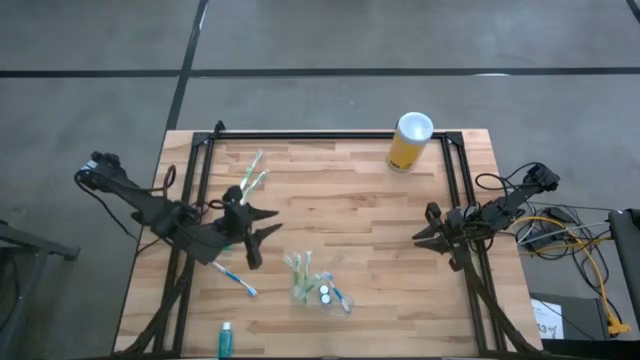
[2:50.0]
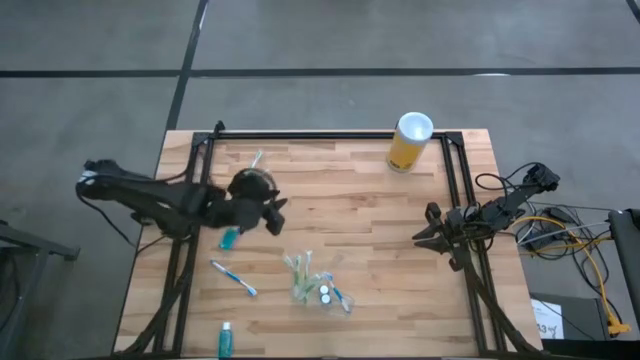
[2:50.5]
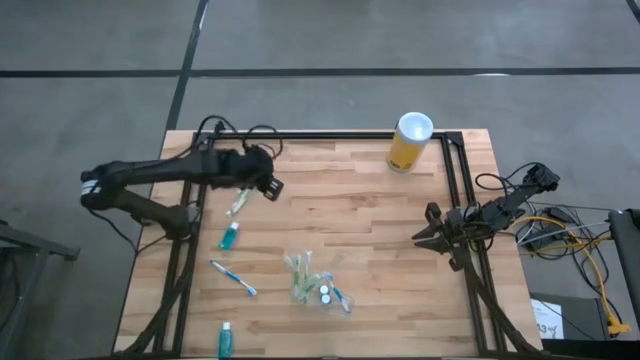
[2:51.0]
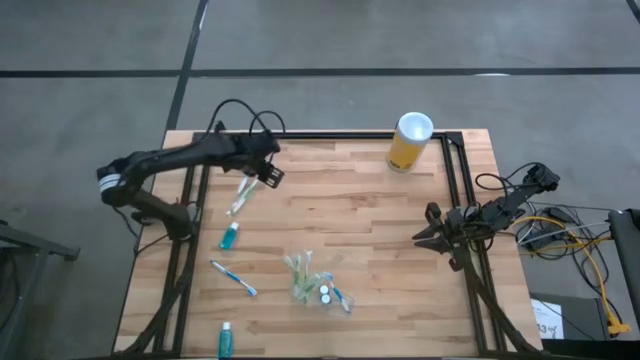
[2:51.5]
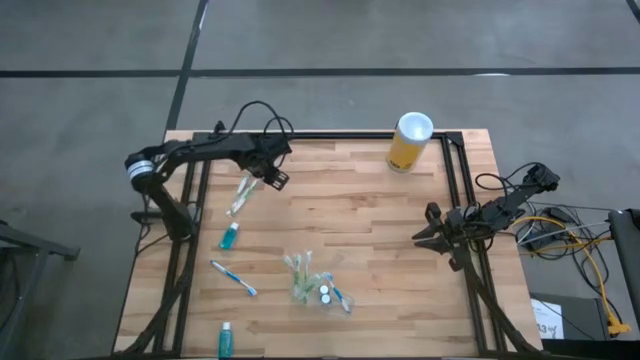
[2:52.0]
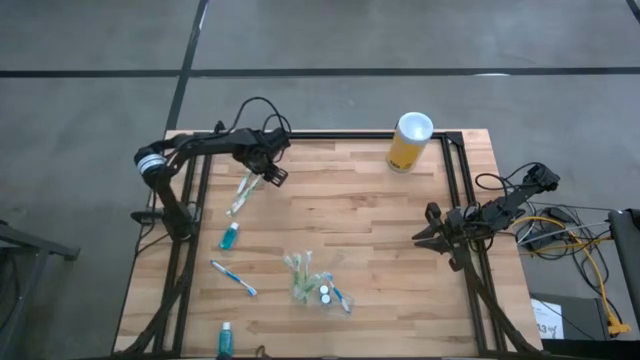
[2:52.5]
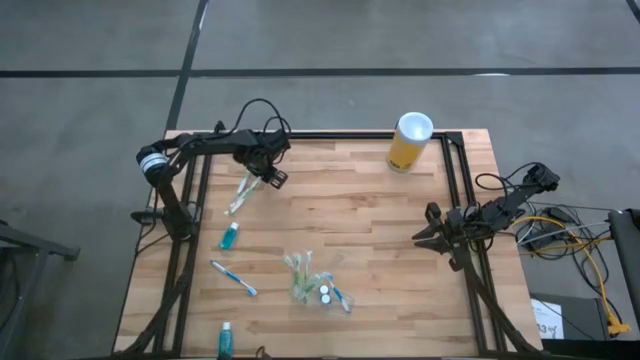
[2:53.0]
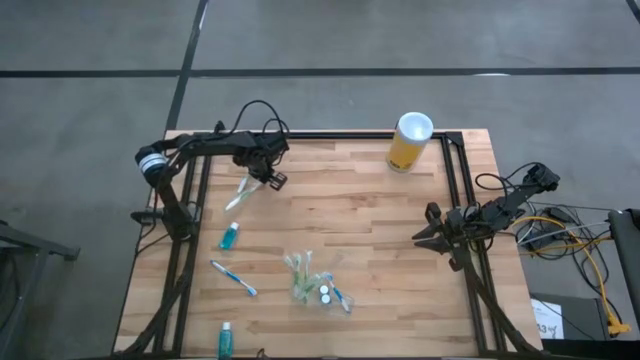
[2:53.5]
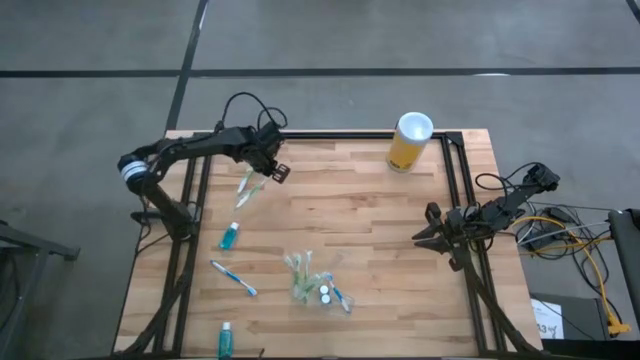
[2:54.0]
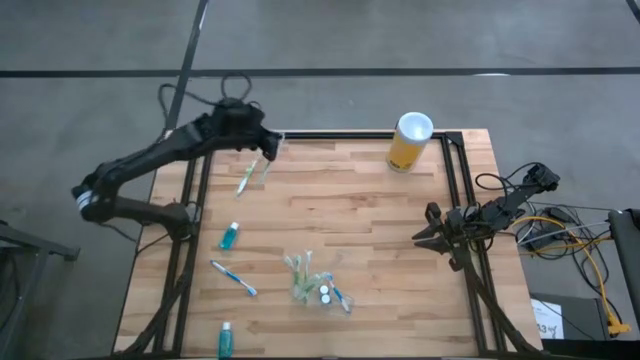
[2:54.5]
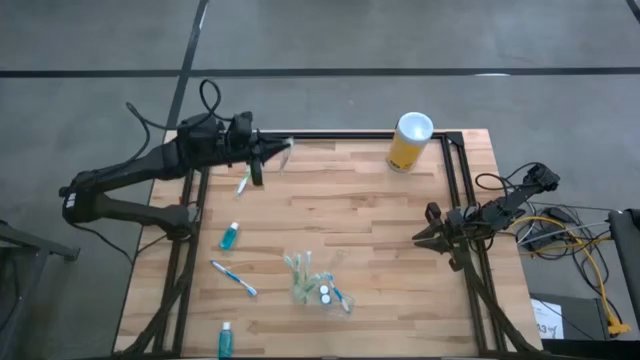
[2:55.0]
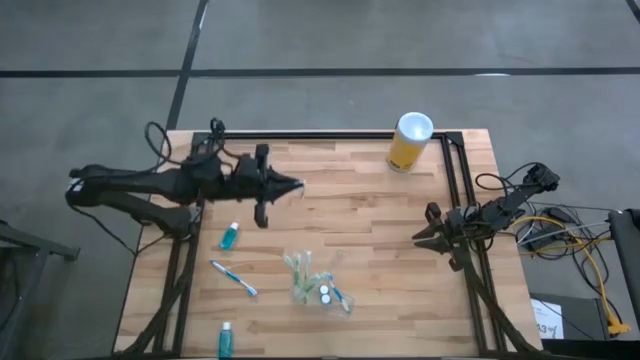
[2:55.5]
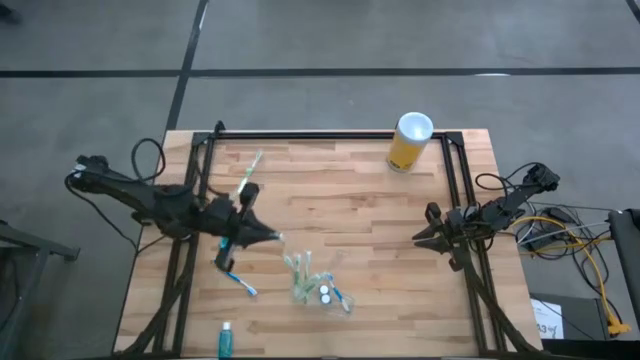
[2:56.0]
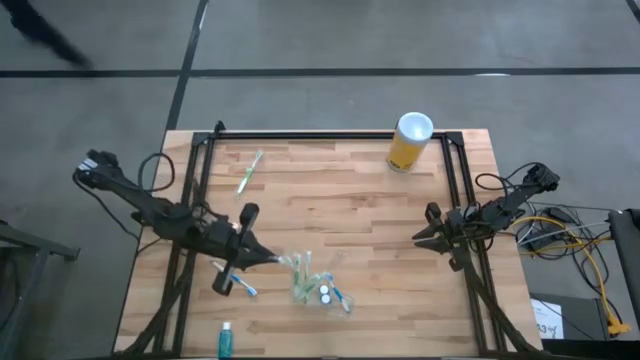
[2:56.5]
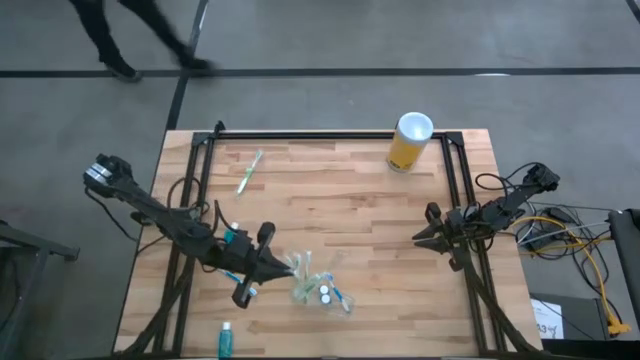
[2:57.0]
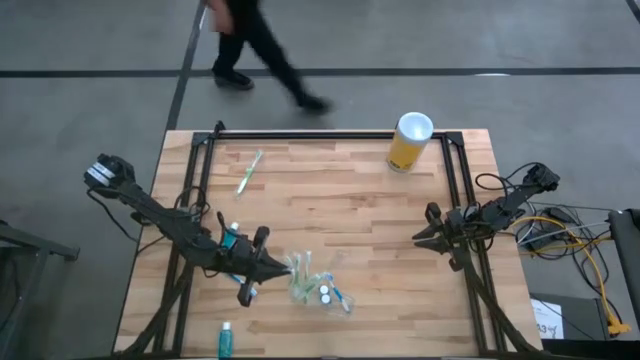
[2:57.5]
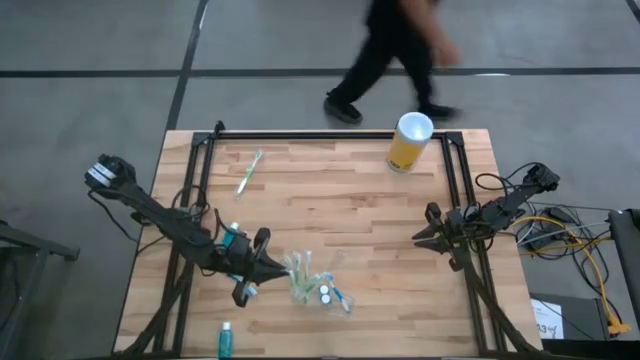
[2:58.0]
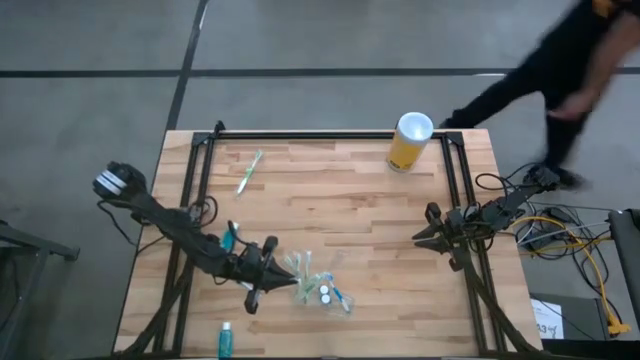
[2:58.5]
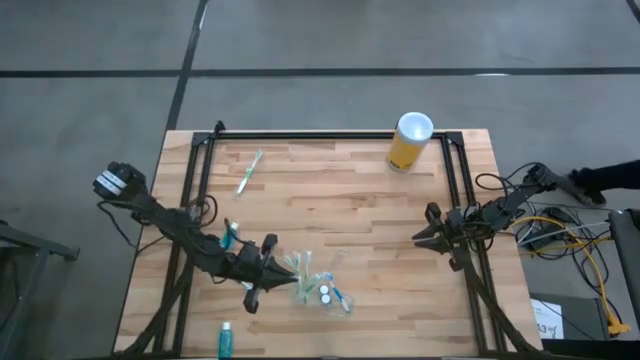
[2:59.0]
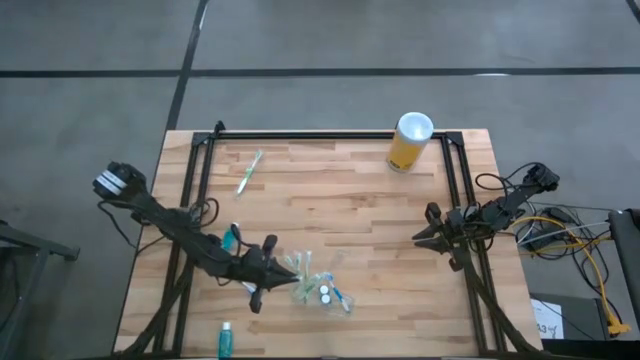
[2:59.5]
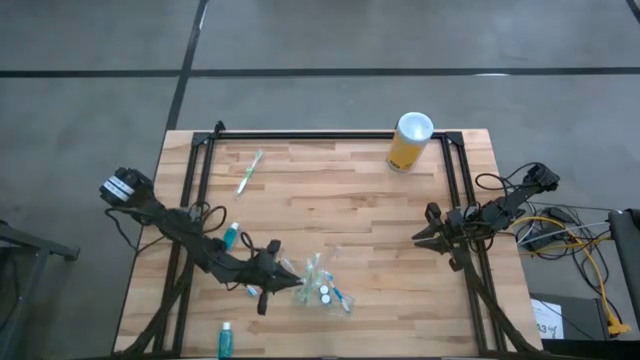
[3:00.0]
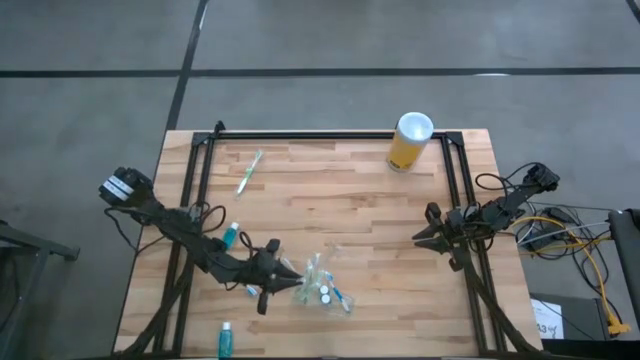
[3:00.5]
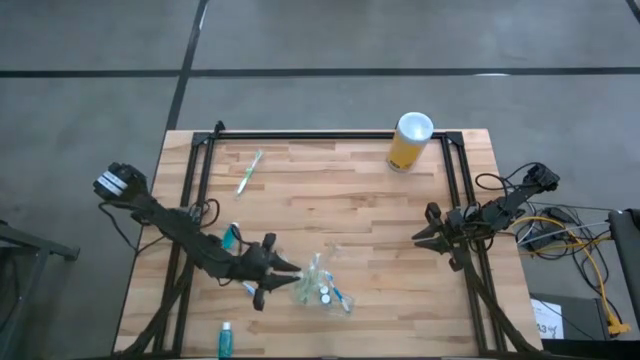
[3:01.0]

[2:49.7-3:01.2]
Task: Pick & Place toothbrushing station
Put the green toothbrush into the transparent organizer

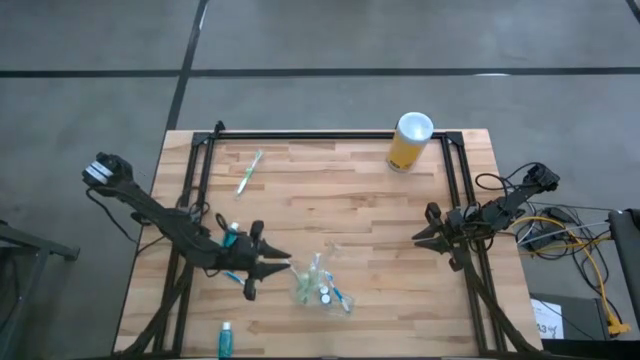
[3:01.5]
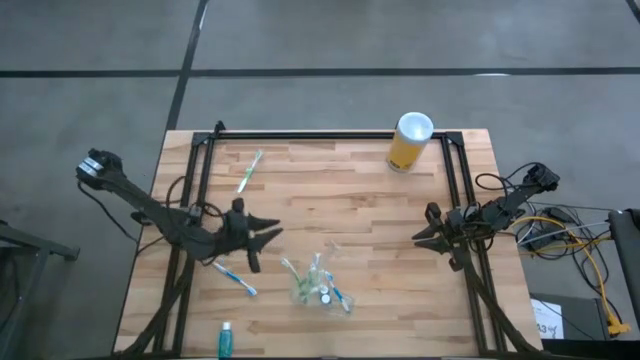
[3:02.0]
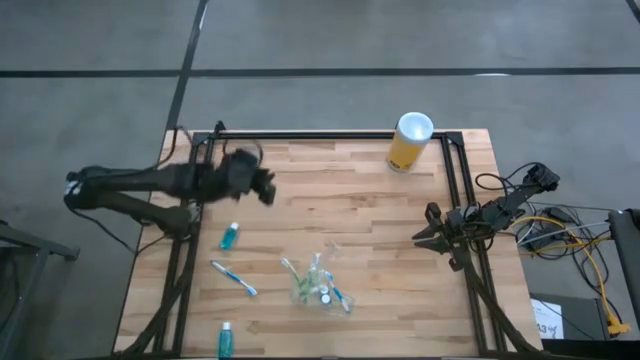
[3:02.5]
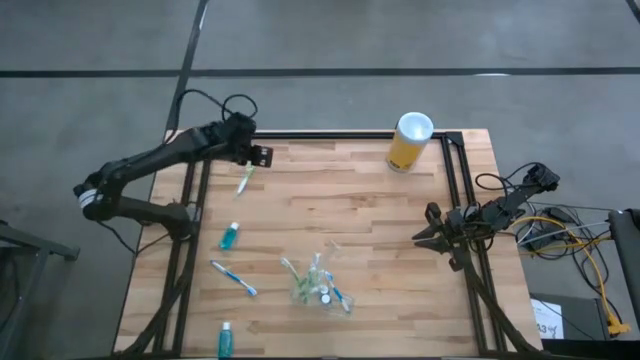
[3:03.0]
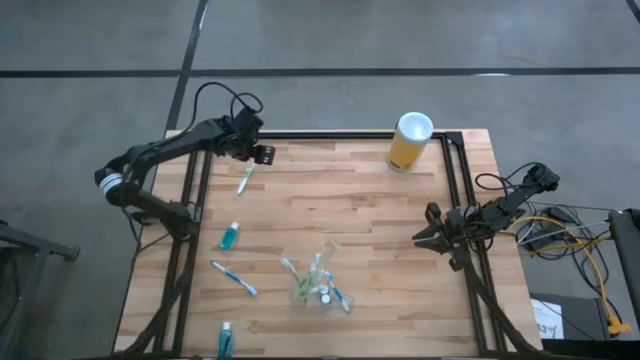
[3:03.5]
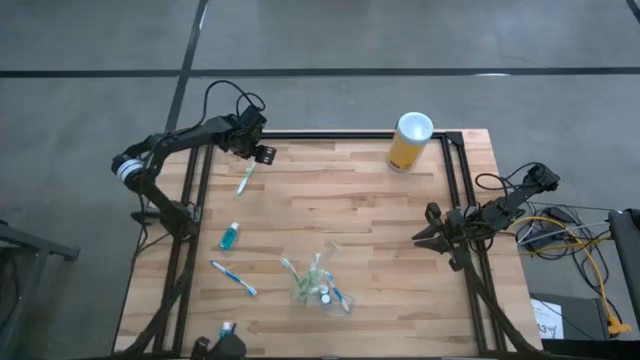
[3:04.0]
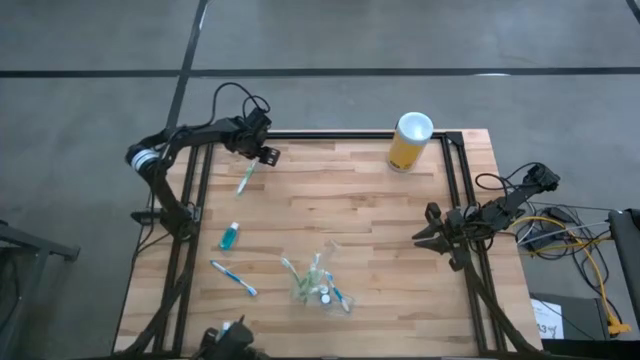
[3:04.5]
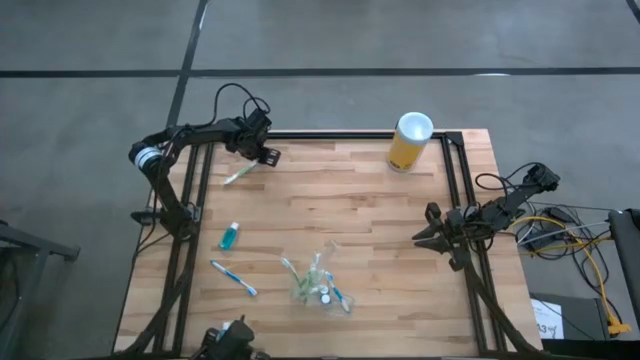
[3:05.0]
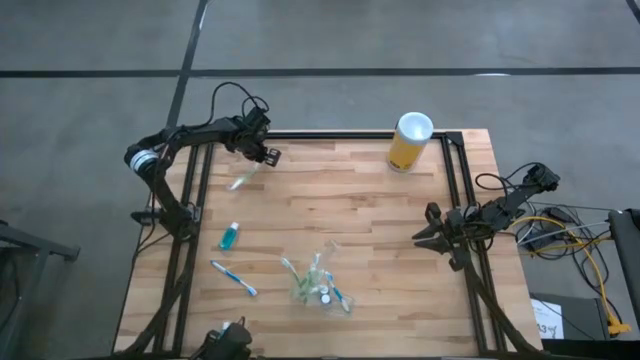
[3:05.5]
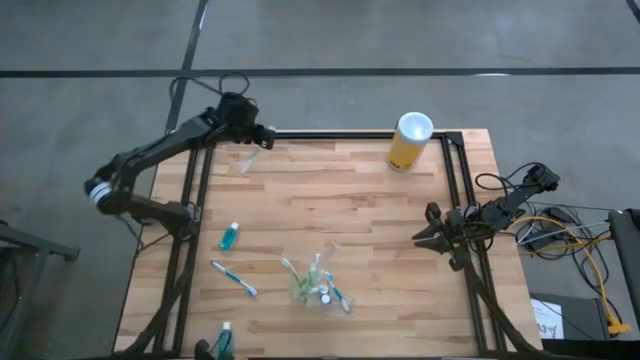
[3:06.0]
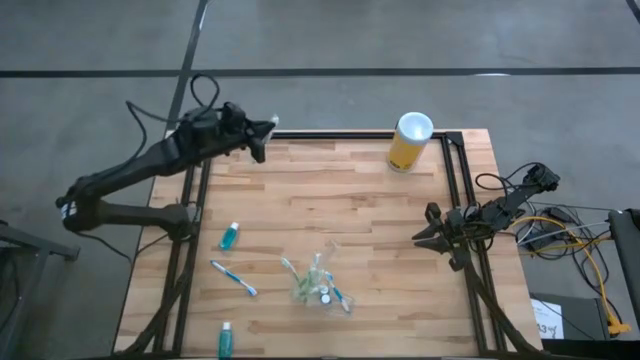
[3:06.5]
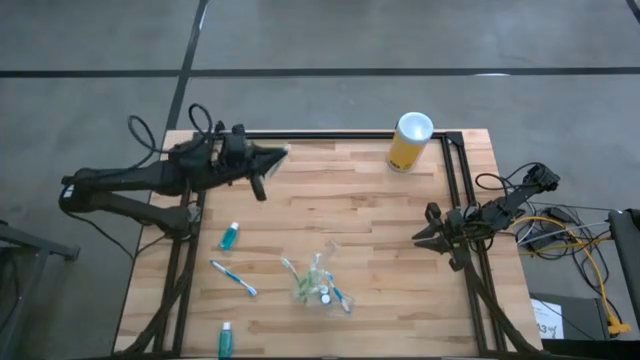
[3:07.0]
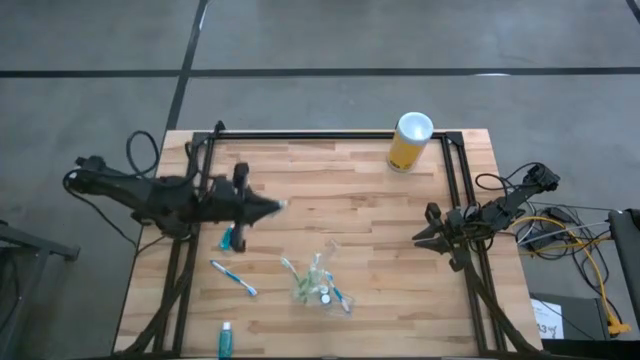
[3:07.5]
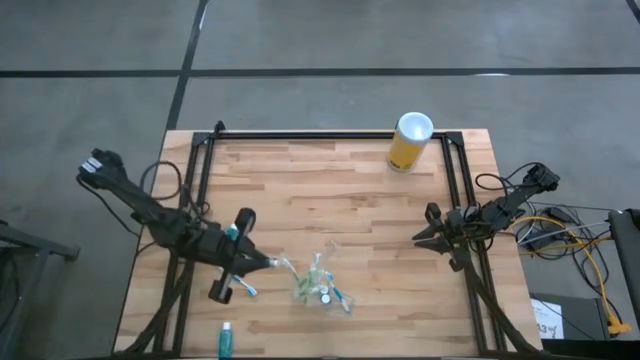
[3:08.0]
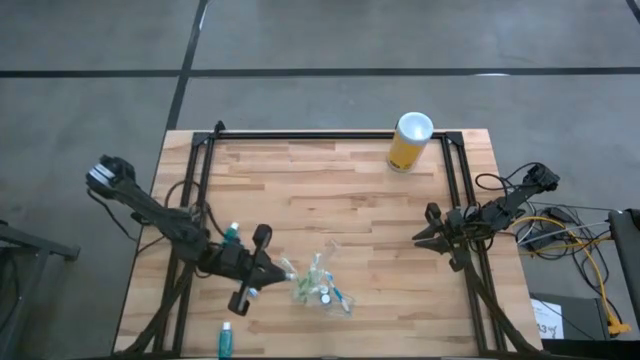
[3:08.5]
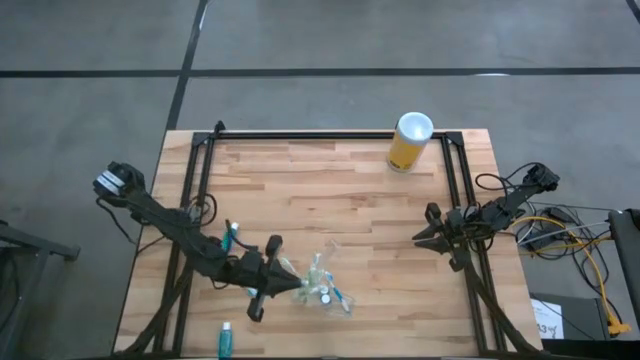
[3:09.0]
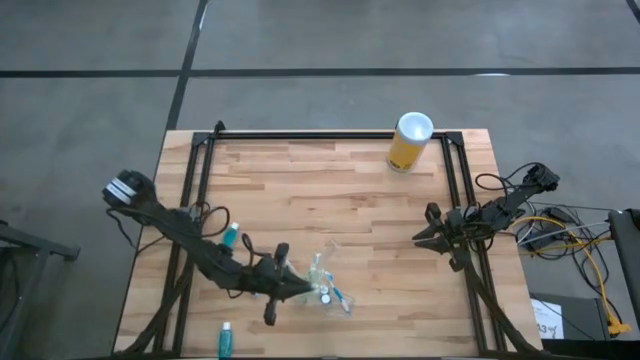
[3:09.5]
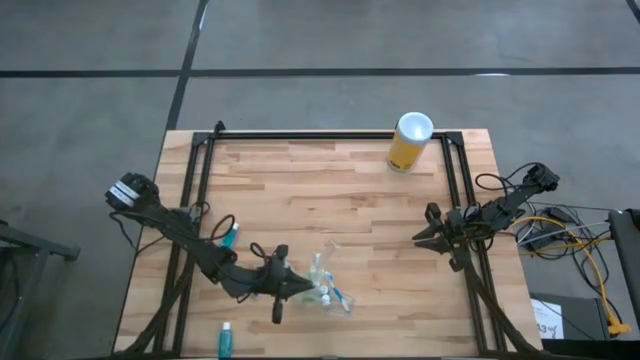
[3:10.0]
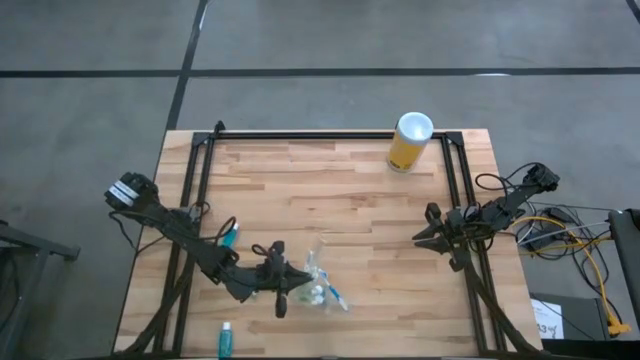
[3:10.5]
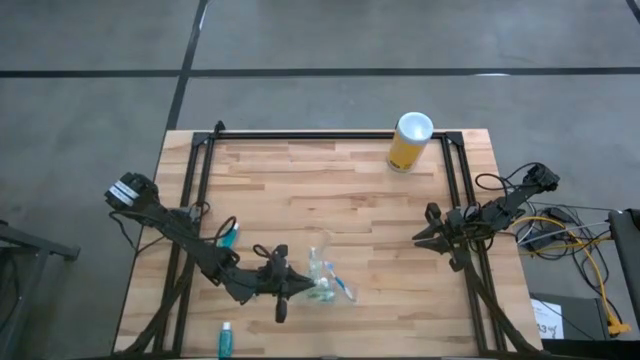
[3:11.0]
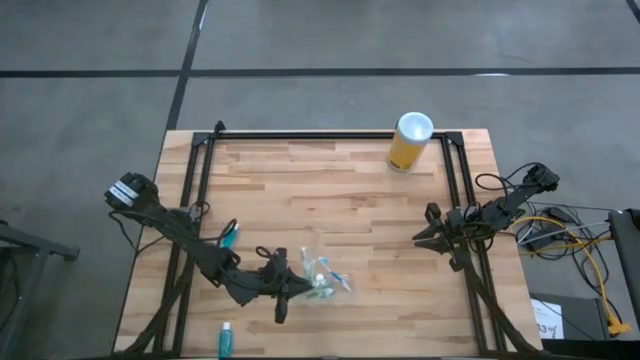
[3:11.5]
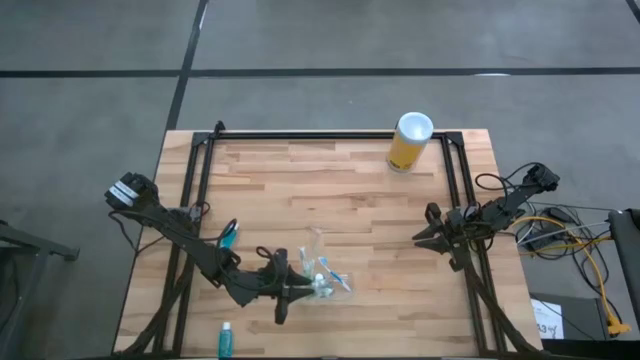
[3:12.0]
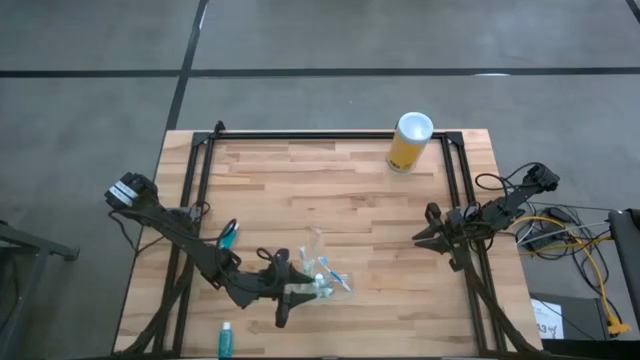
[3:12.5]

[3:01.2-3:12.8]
Put the green toothbrush into the transparent organizer
